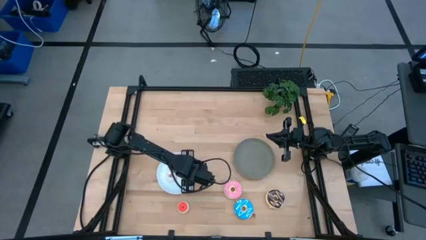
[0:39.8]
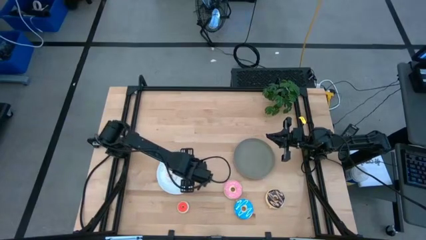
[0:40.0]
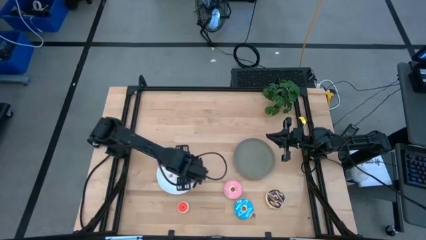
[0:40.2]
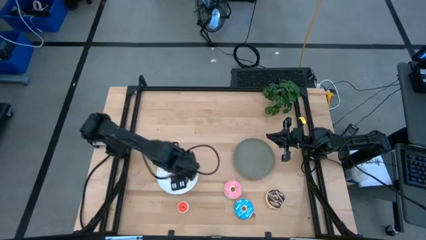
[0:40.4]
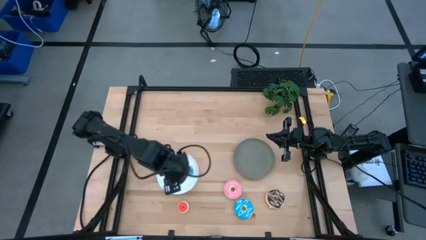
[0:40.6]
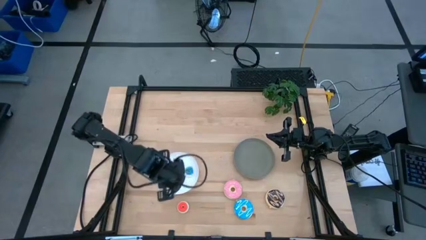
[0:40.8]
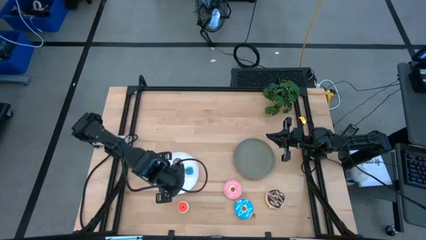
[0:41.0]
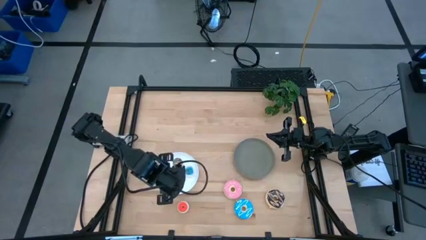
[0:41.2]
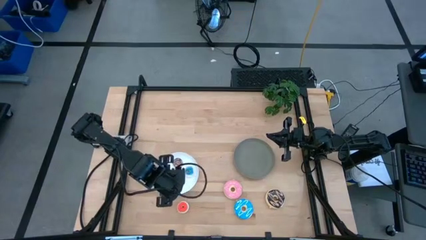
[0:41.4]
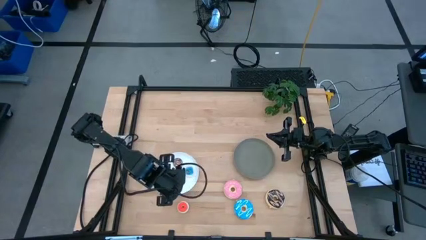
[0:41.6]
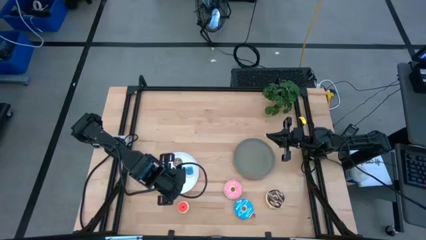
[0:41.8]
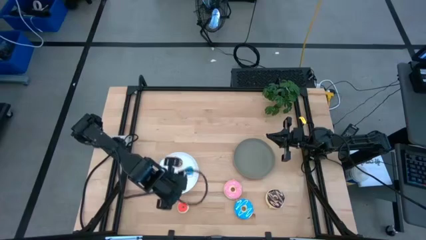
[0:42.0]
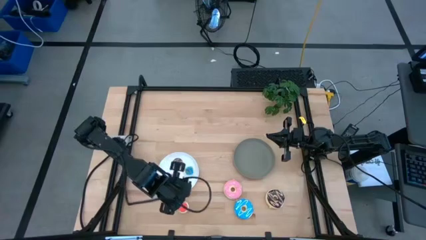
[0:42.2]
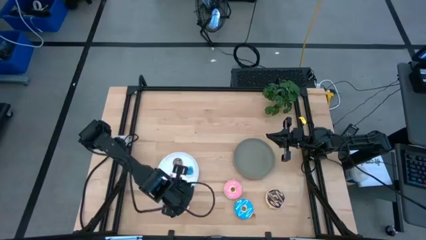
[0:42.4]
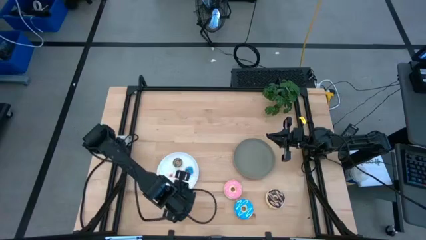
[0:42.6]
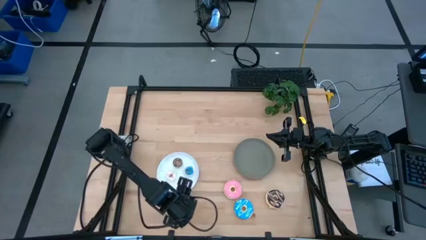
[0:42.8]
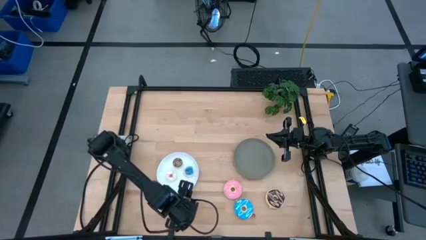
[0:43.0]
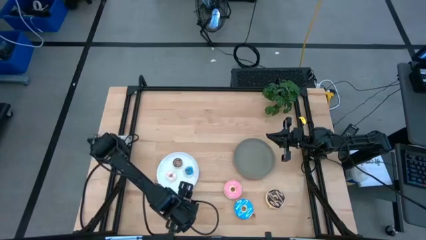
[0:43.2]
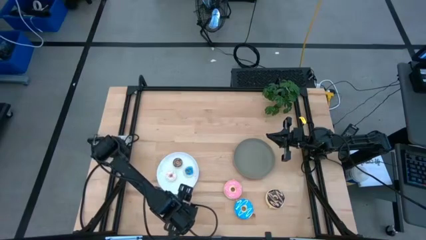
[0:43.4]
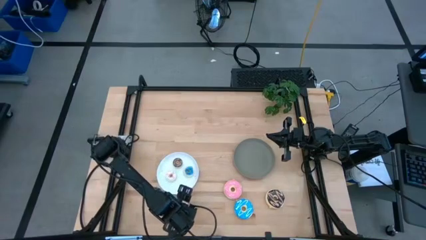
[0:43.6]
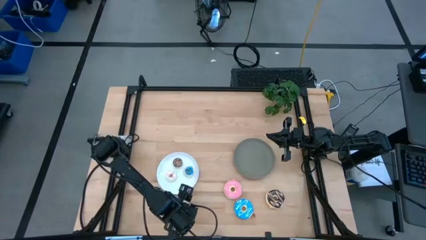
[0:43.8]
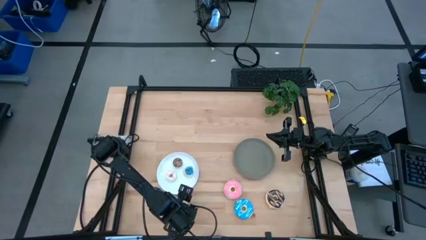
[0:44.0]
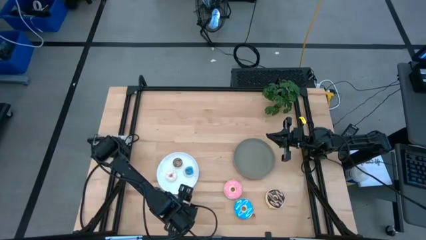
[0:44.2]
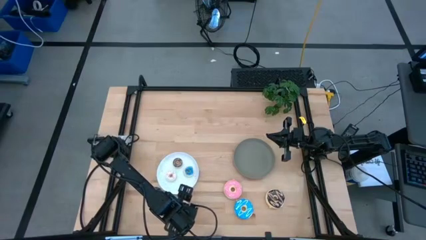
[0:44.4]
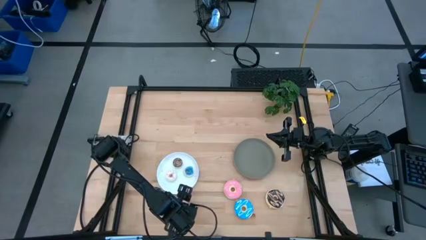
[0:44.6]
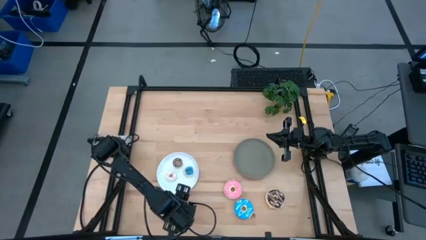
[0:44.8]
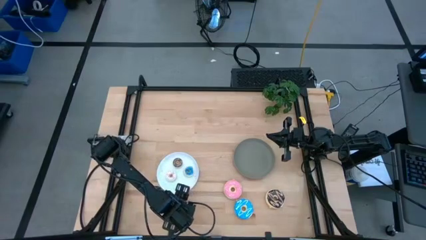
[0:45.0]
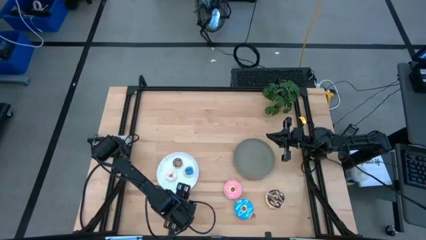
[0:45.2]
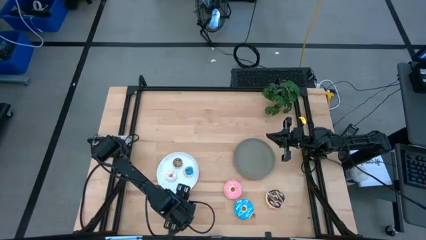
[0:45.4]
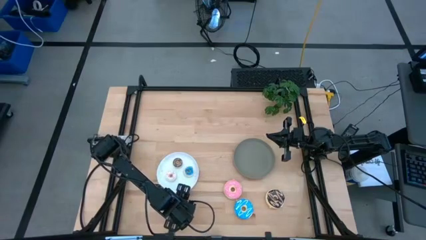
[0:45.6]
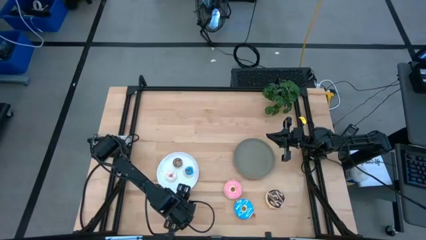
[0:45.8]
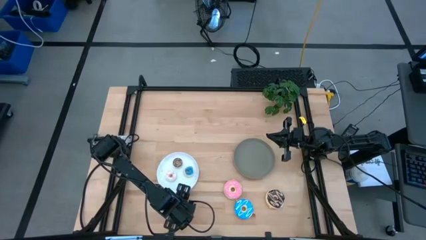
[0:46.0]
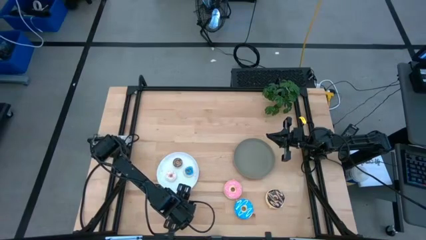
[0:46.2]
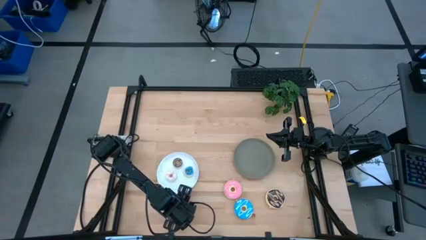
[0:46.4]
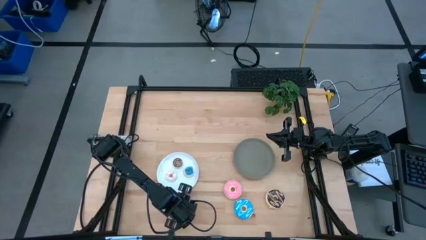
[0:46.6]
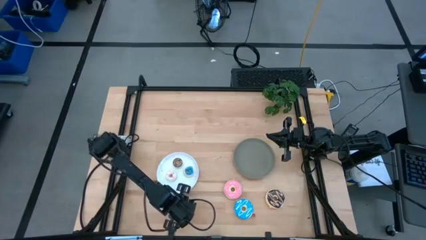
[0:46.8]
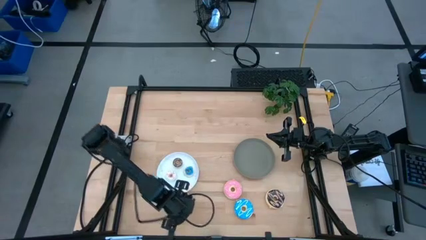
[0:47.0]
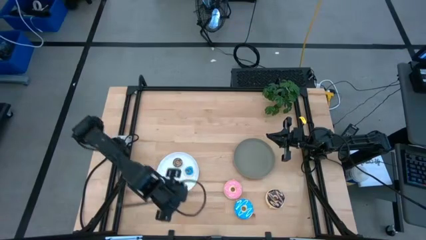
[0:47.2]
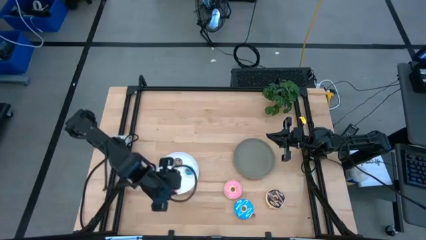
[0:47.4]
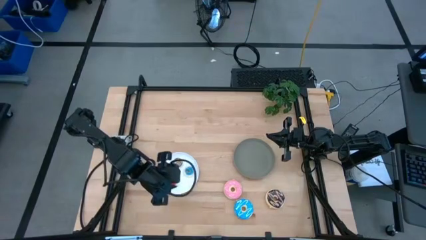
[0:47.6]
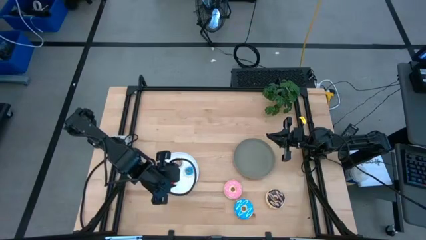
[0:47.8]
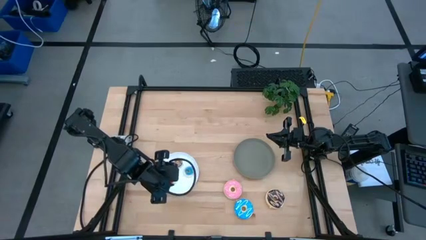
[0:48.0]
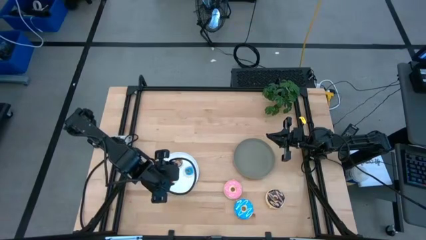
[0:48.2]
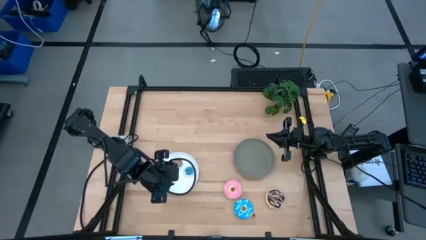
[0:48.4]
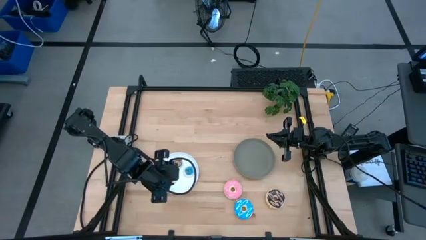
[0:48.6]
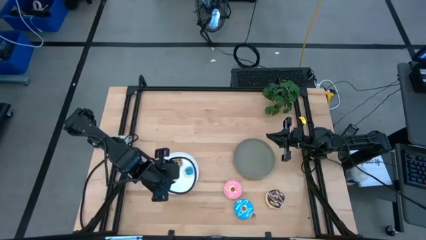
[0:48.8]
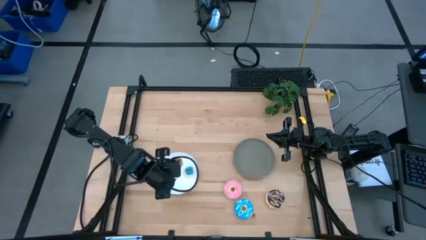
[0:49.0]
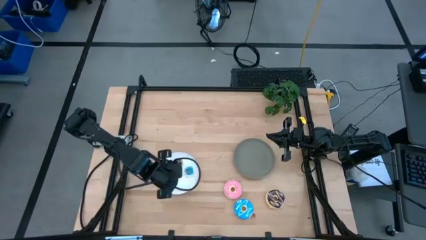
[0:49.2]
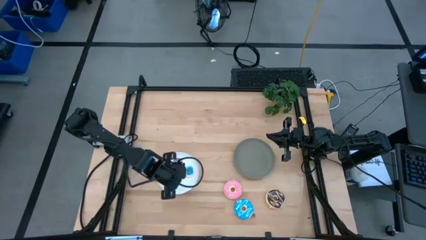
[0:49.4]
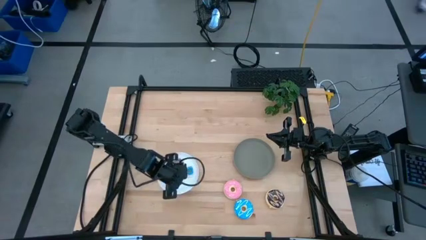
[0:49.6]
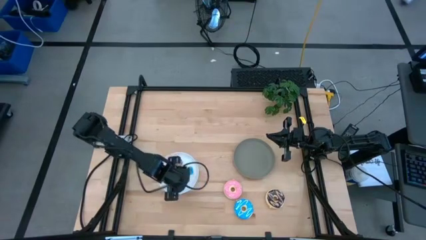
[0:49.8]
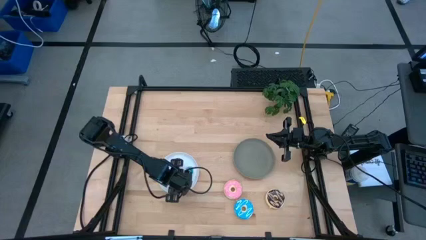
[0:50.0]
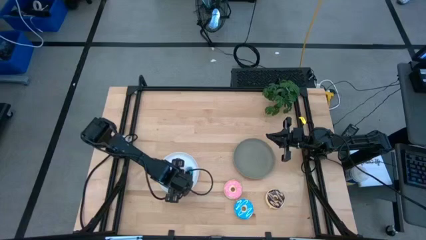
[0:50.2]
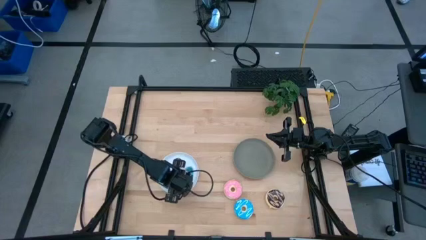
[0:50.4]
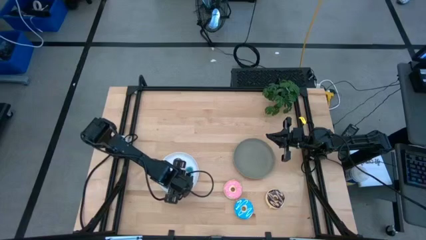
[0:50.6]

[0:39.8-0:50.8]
Task: Pick & Place donuts
Put the small orange donut on the white plate

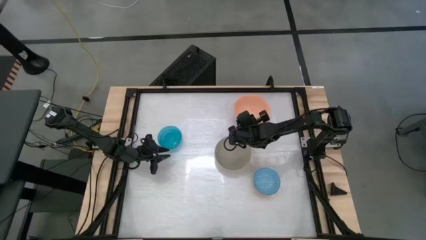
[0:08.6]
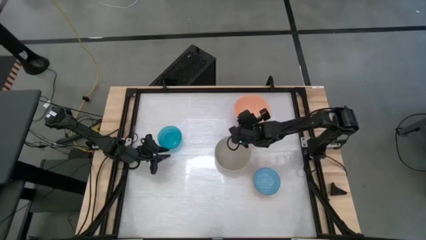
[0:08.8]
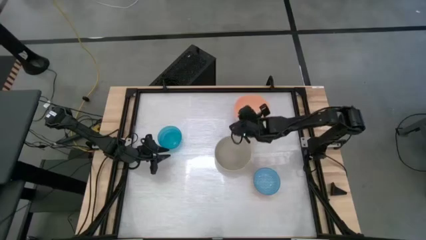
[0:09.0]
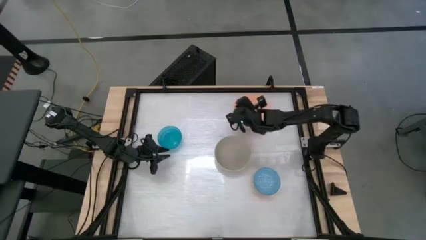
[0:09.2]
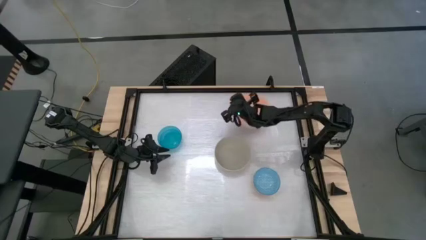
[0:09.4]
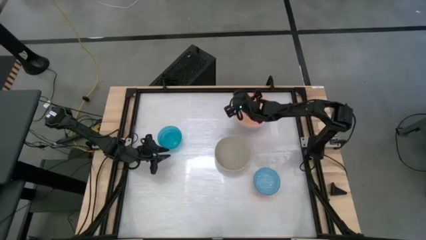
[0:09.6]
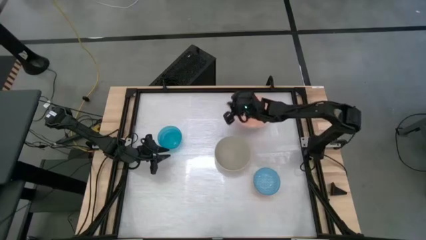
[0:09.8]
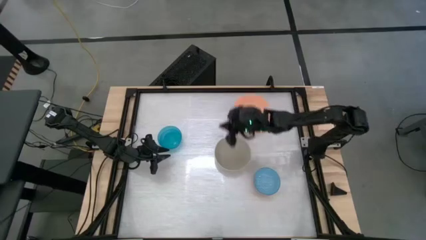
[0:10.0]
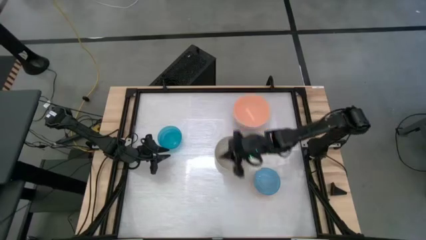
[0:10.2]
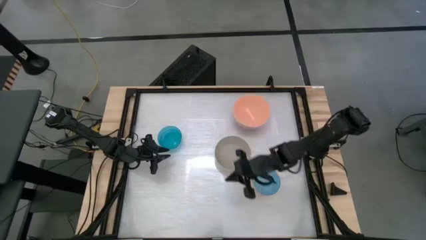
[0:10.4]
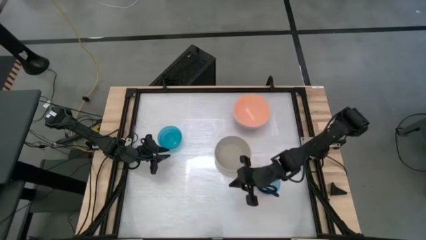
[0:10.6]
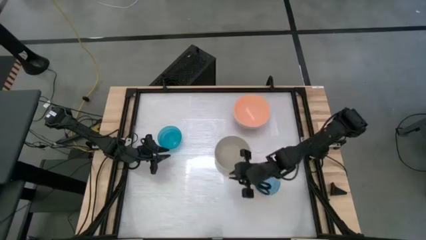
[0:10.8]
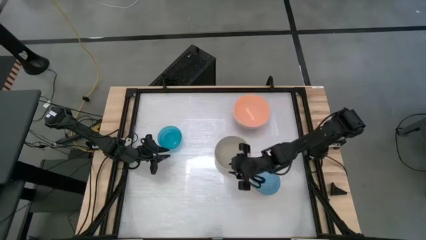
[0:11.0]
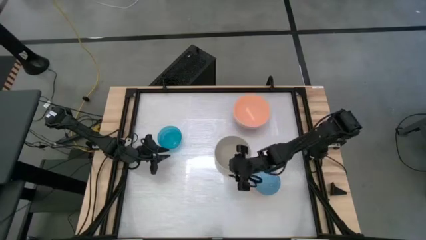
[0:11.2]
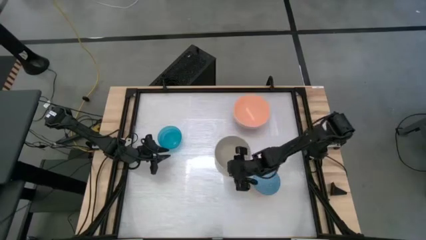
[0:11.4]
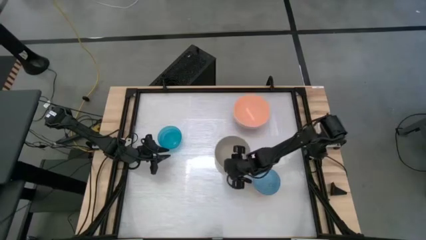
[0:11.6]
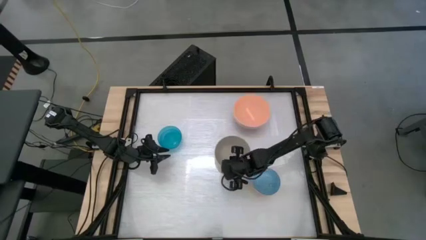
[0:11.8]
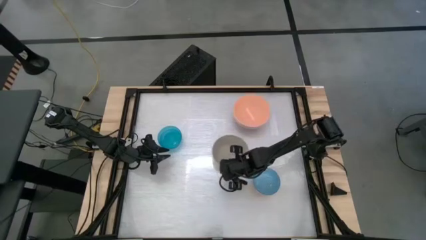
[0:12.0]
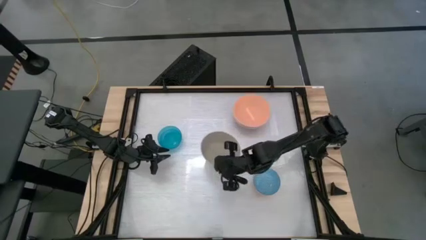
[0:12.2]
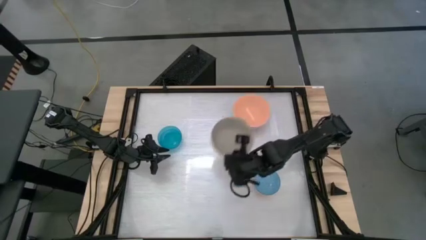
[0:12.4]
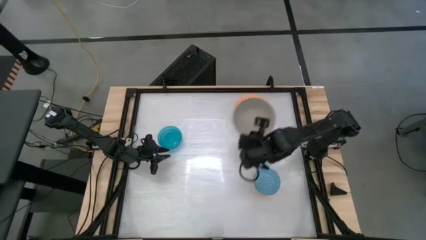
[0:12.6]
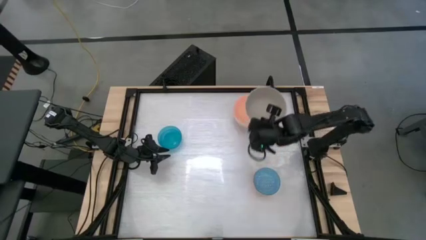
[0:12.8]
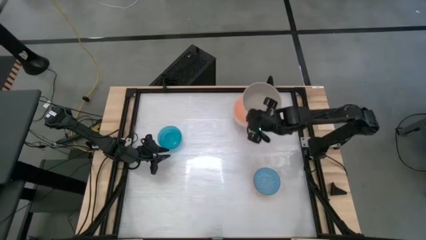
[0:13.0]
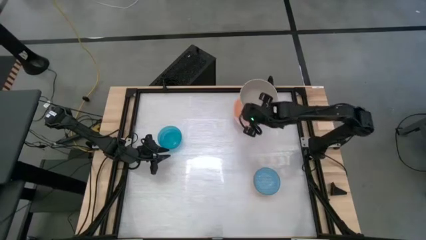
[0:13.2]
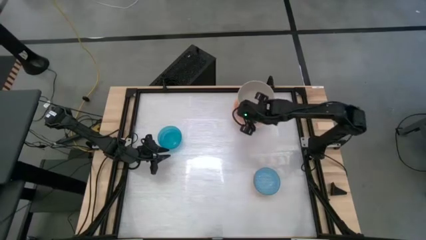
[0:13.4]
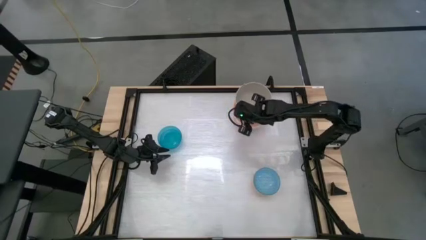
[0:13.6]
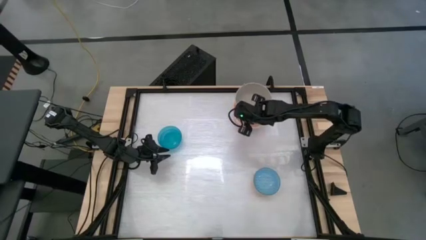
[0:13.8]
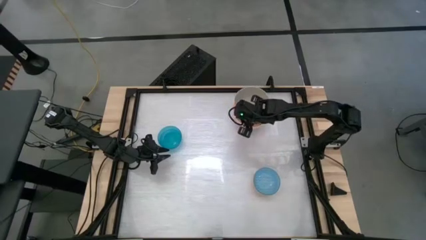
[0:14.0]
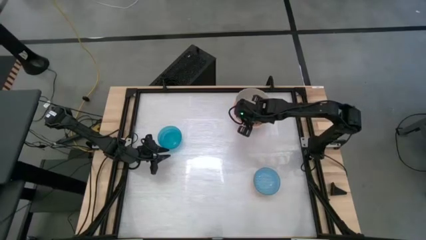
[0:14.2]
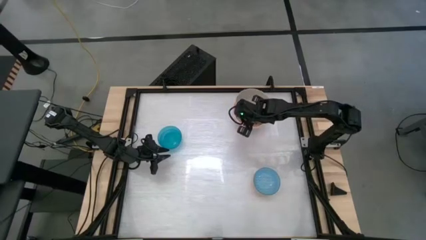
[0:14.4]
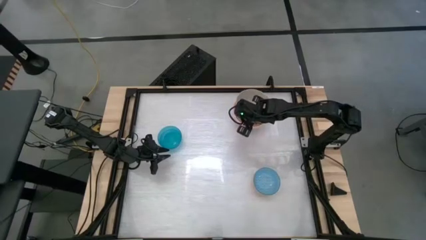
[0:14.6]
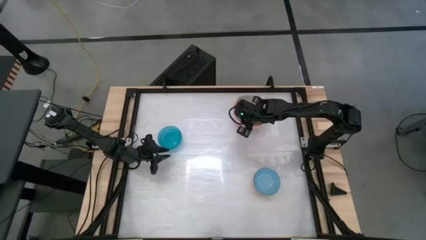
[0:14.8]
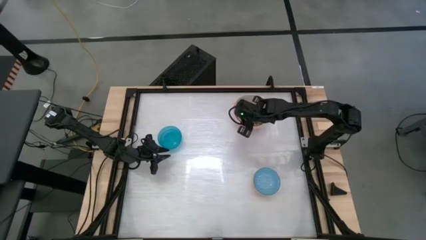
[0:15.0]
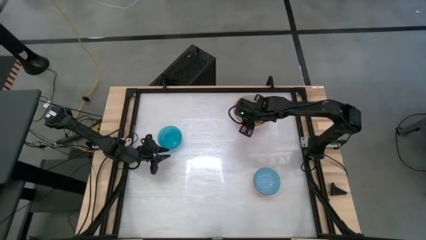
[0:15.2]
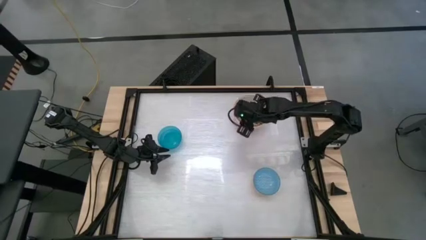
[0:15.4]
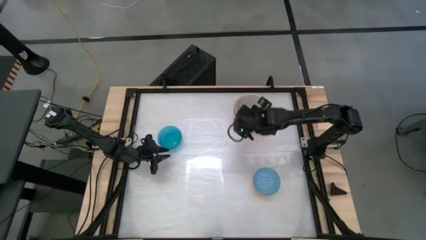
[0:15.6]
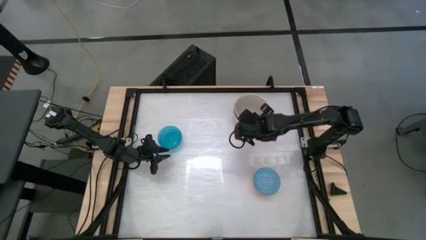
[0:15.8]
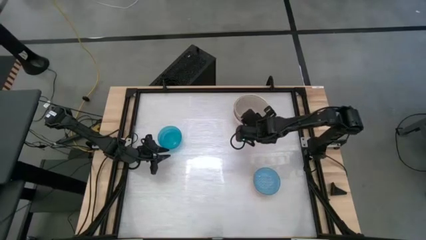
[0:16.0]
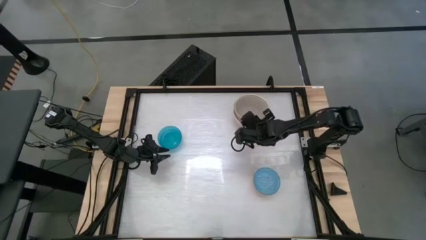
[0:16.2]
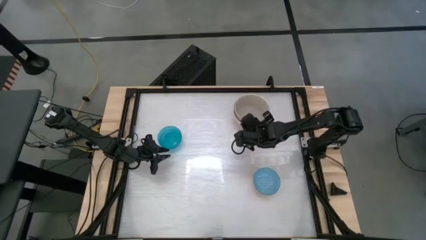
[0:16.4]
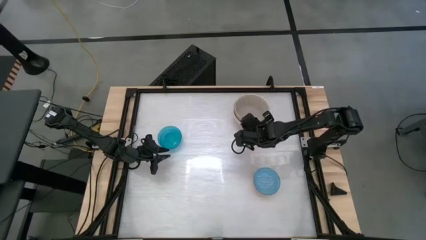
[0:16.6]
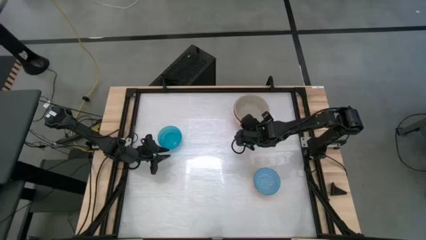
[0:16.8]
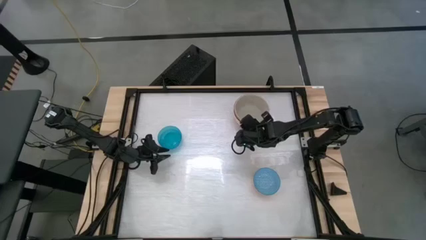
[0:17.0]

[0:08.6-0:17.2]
Task: Nest bowls inside each other by size order
Stack the gray bowl on top of the light orange bowl
